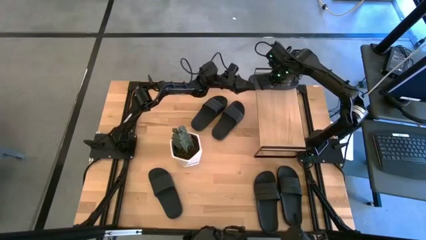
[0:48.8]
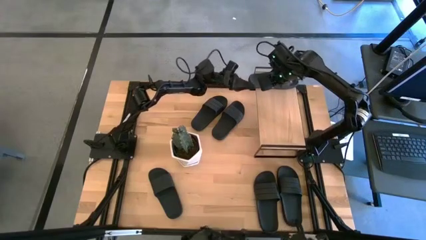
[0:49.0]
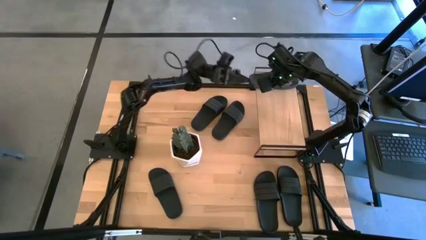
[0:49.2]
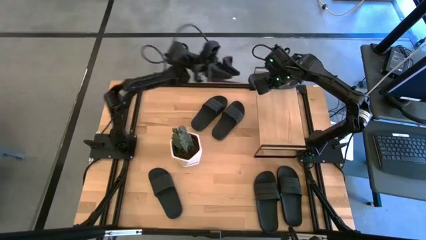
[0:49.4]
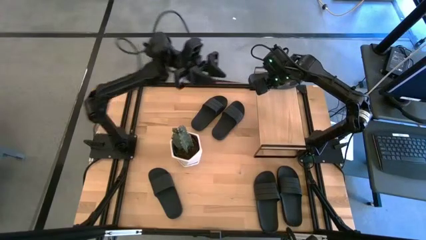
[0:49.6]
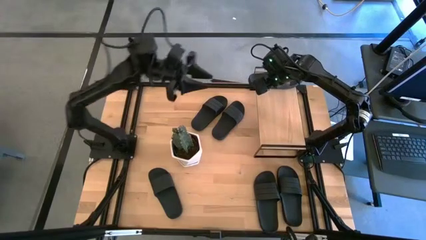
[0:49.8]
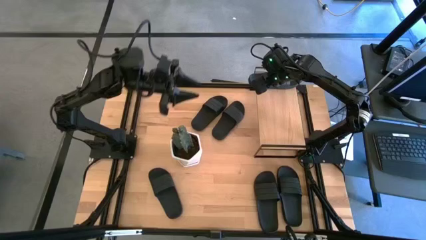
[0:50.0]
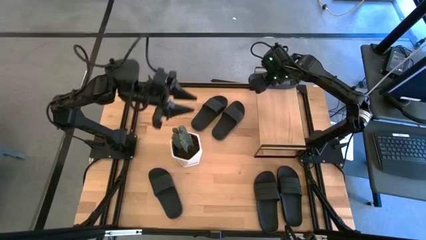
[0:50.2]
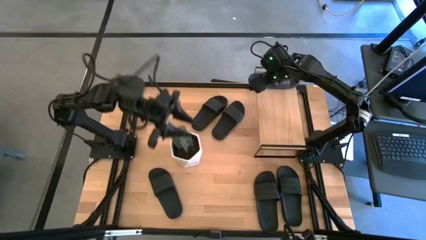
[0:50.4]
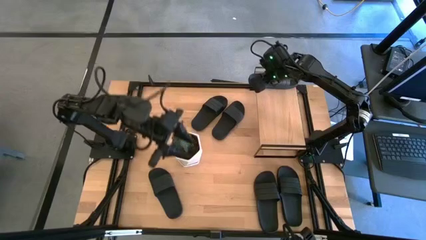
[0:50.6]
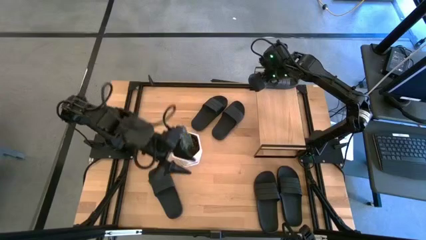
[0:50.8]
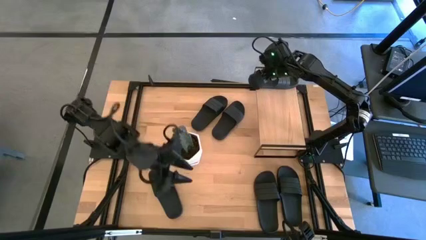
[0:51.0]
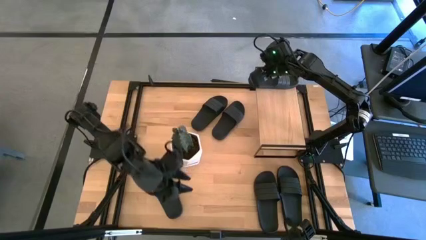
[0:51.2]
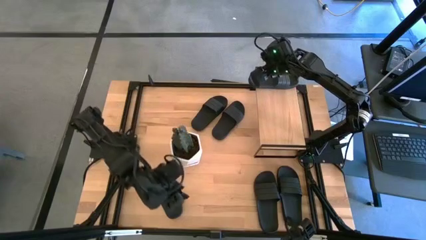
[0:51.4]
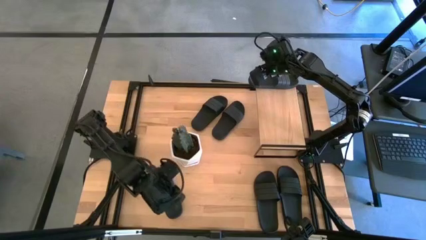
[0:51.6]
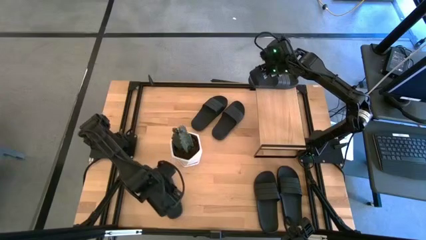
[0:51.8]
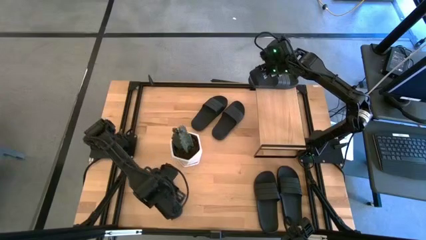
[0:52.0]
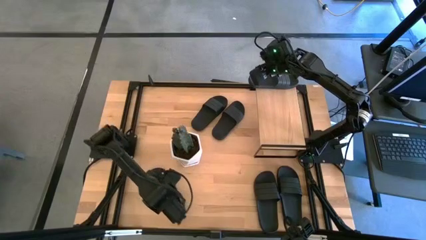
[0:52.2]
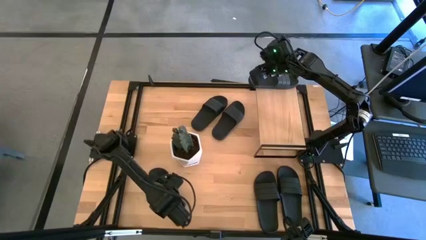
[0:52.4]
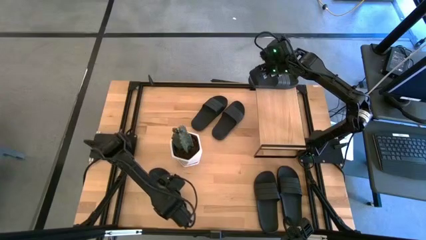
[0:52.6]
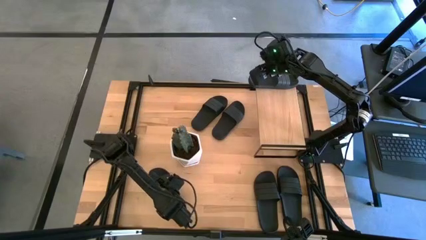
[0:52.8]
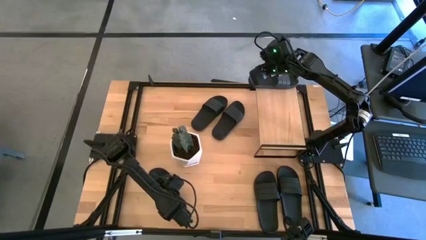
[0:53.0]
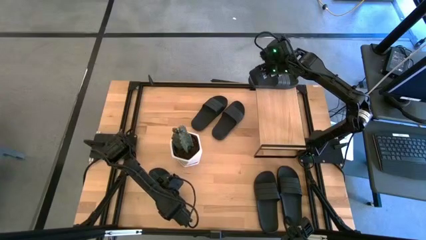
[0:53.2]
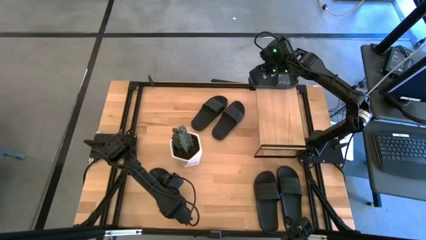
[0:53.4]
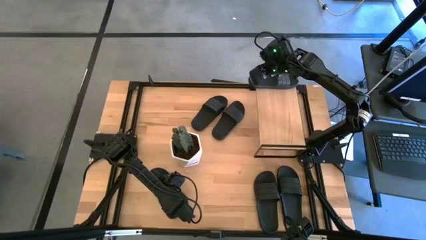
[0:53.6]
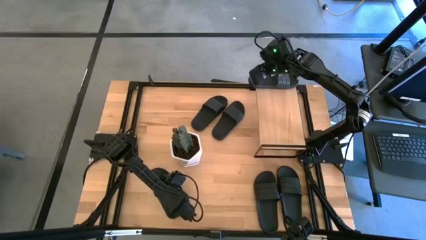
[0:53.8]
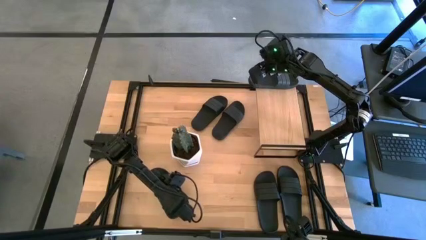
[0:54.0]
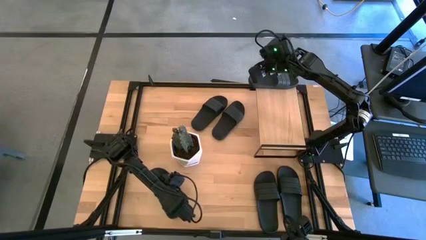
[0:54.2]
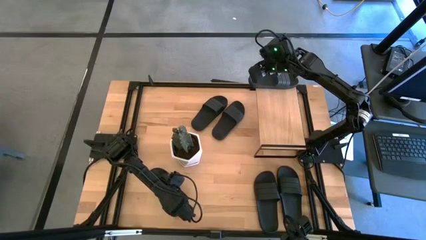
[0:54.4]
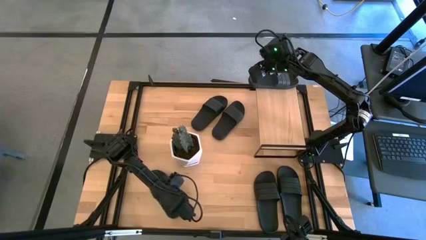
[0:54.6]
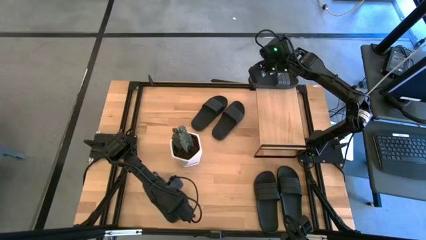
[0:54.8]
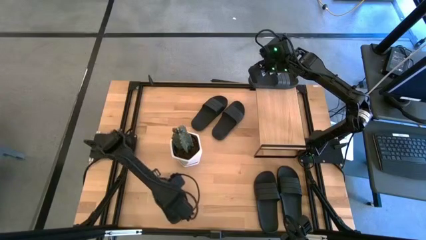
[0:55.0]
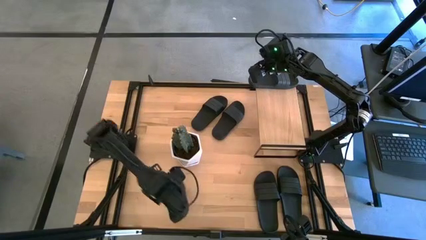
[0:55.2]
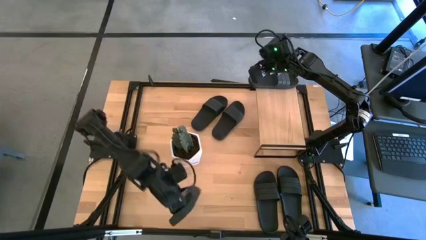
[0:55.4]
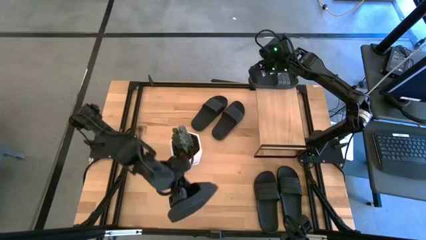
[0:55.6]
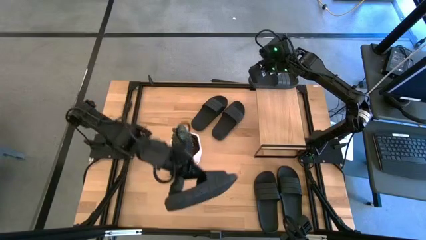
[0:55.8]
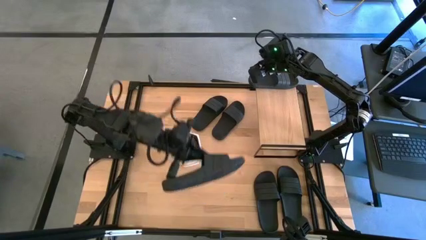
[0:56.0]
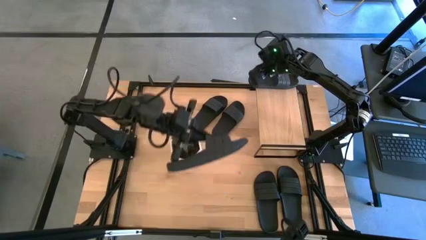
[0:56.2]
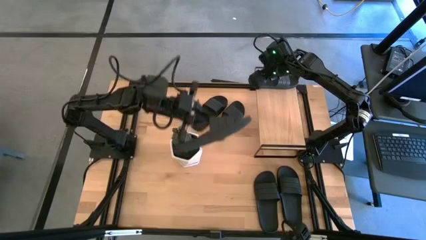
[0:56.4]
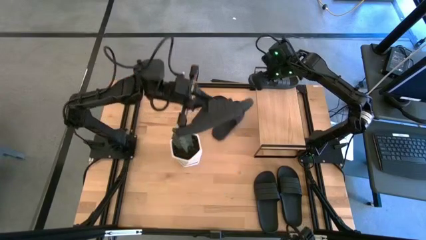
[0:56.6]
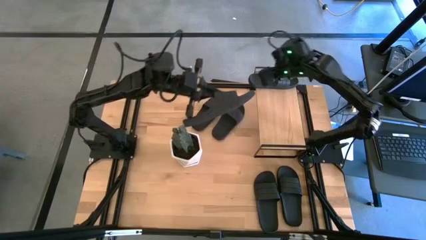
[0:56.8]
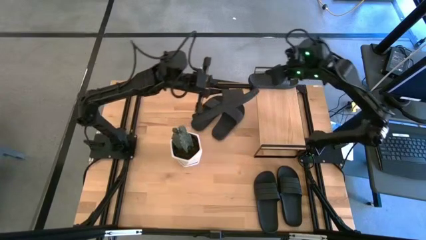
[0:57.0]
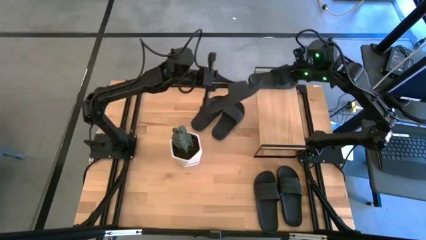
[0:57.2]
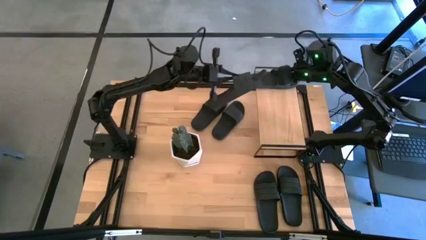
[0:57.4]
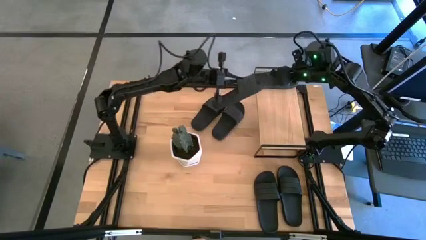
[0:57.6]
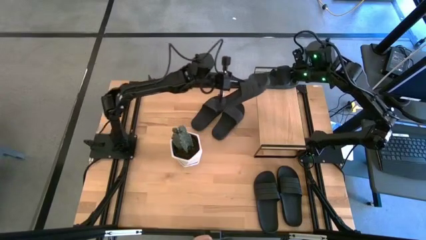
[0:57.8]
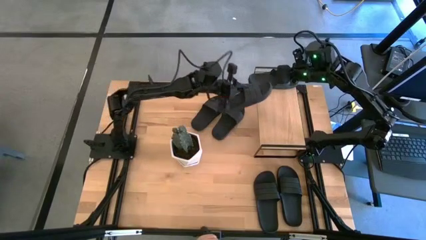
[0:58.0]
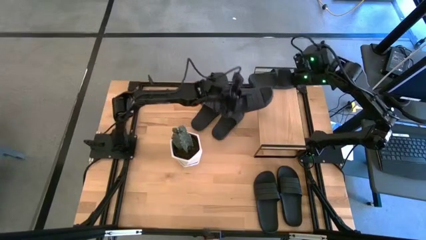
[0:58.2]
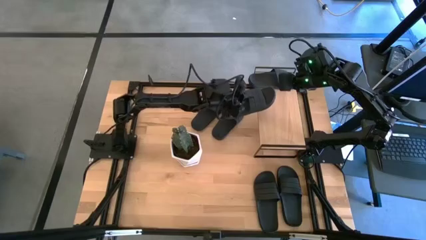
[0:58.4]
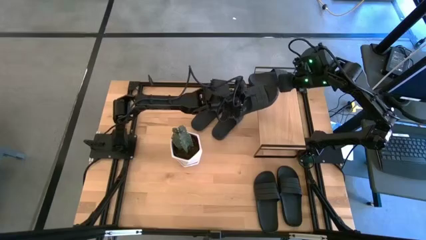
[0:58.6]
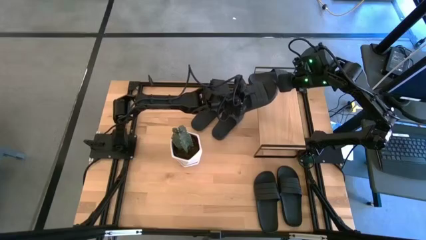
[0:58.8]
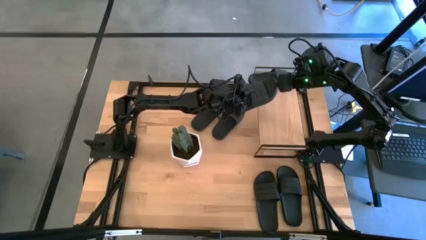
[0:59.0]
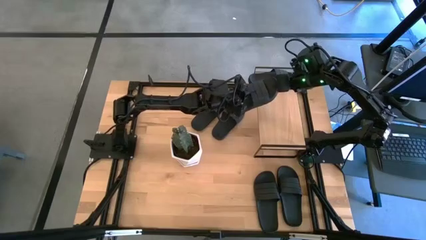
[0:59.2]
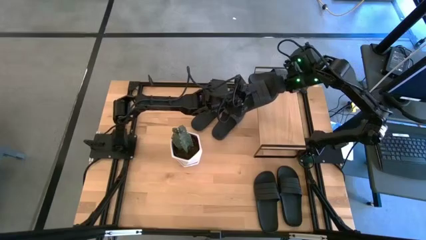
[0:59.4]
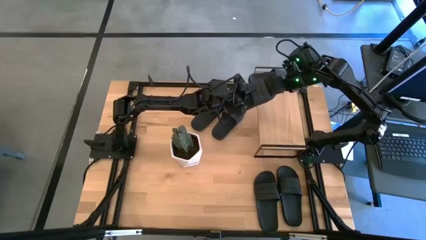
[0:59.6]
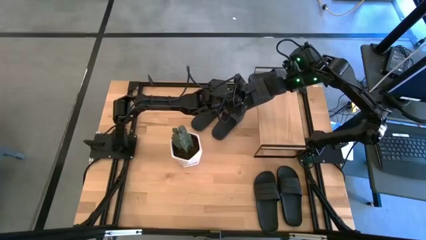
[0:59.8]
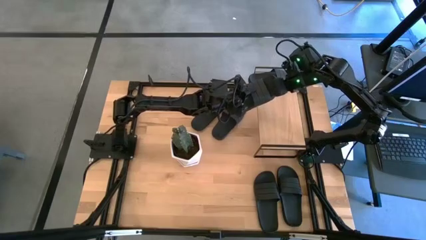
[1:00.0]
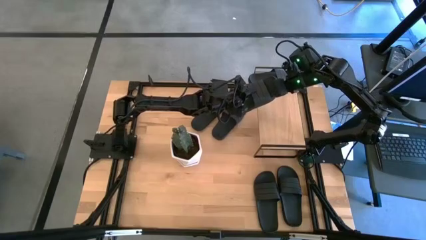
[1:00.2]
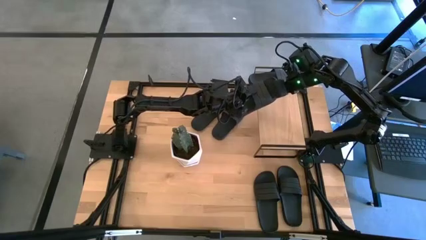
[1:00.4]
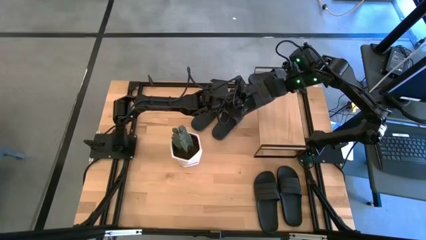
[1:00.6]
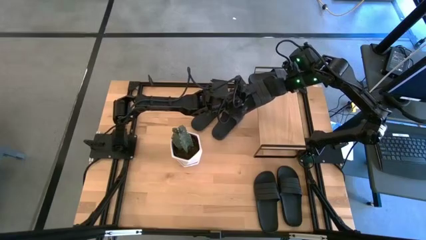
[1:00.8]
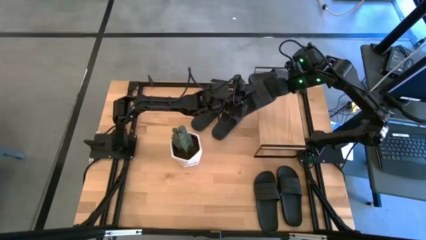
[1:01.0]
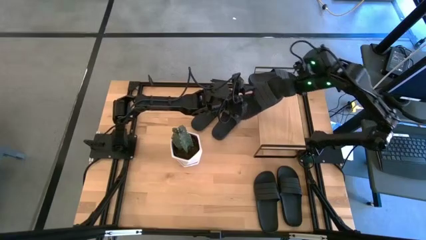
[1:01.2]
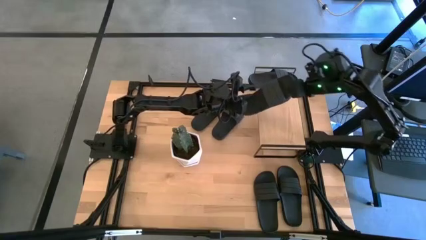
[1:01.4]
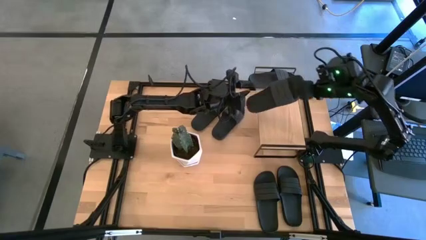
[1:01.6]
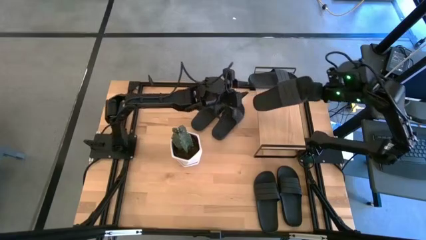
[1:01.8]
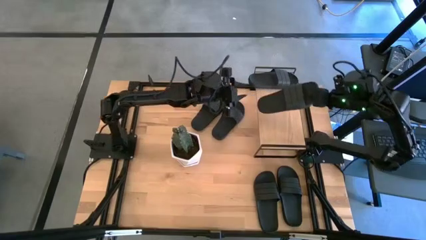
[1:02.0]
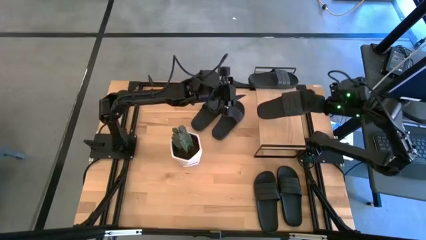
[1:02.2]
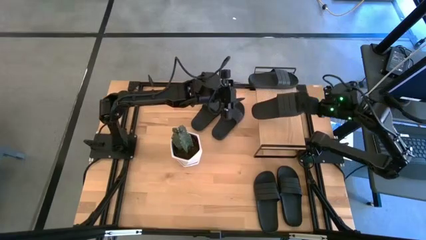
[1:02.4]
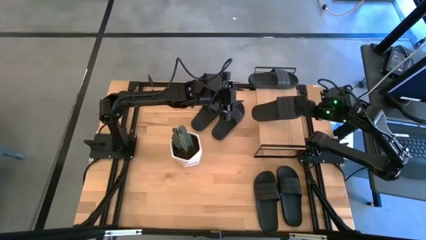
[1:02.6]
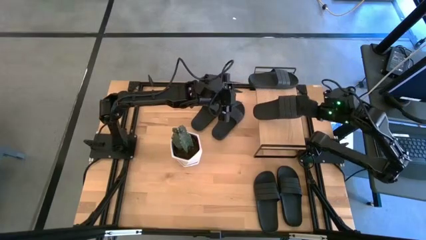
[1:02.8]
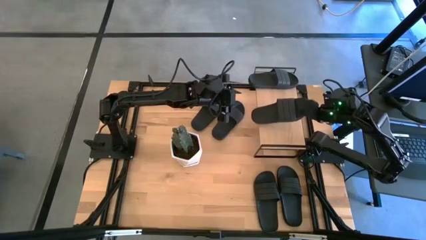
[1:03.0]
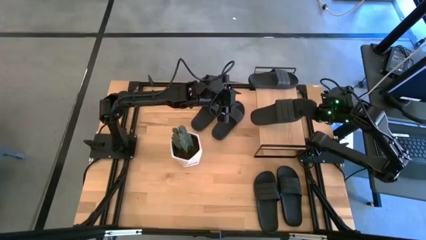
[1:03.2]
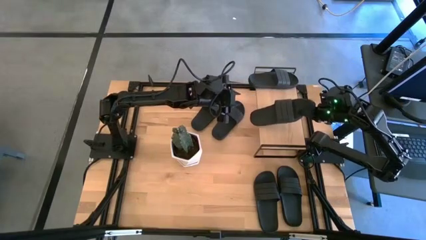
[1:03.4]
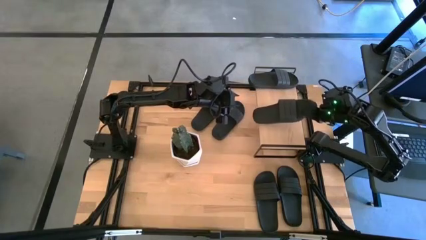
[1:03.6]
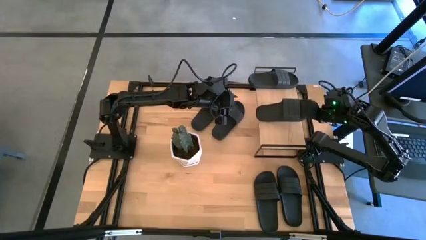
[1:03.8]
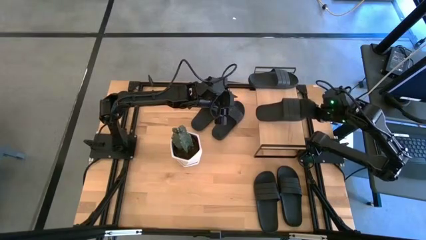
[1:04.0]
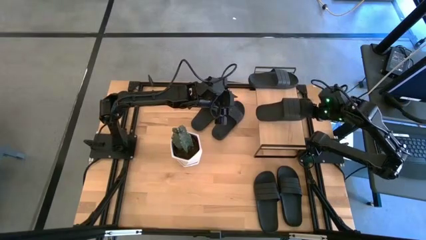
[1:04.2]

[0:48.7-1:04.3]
Task: Pick and place slides into the shelf
Put the black slide on the shelf
